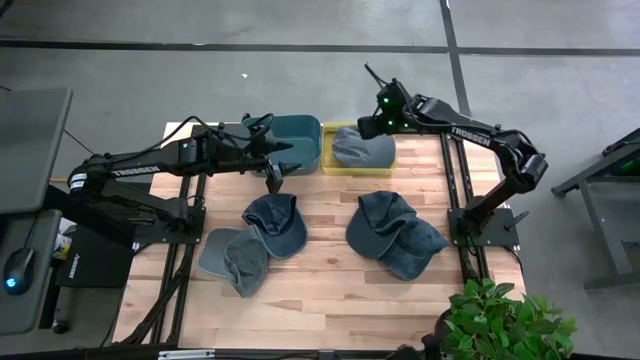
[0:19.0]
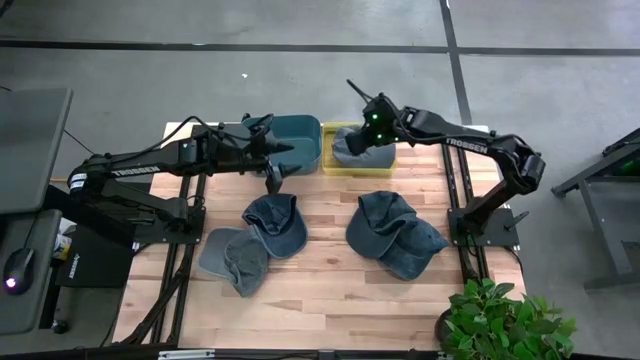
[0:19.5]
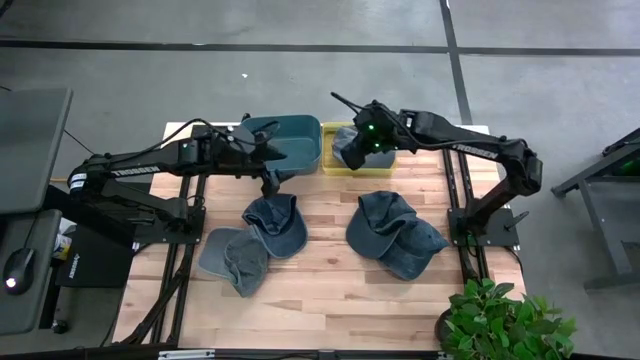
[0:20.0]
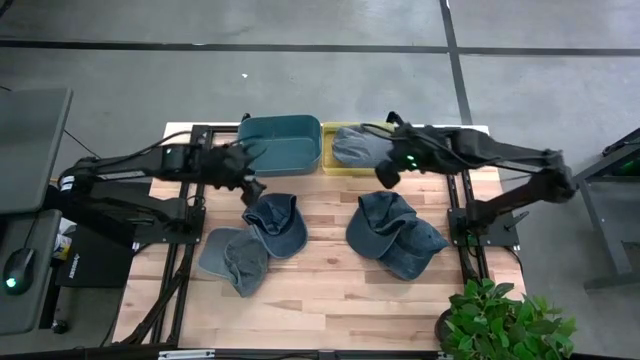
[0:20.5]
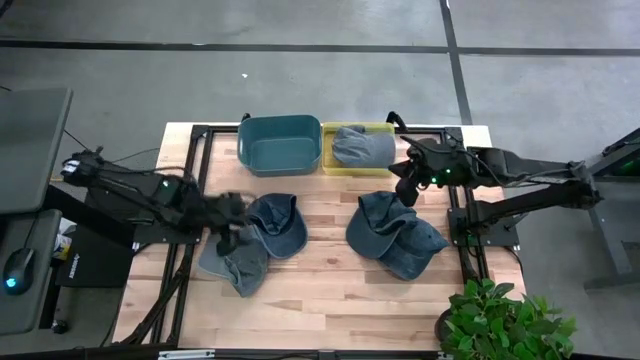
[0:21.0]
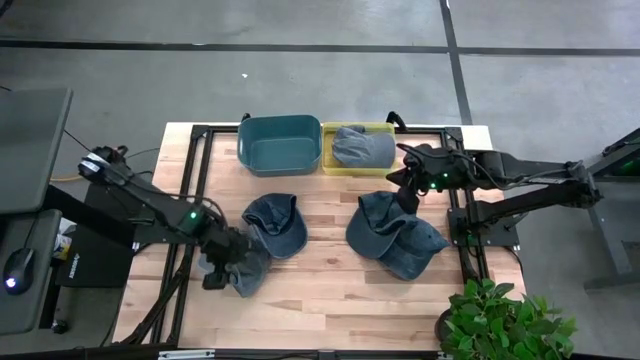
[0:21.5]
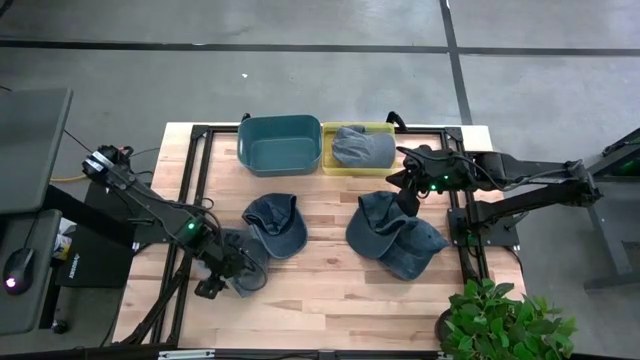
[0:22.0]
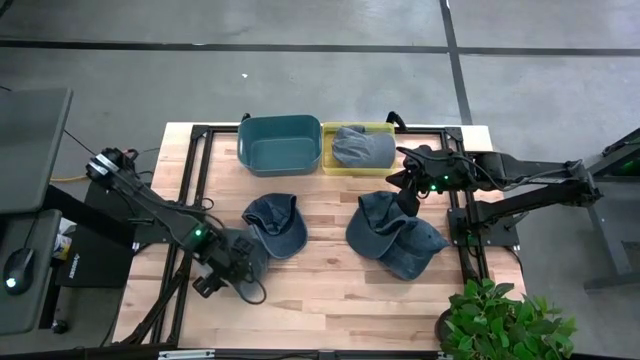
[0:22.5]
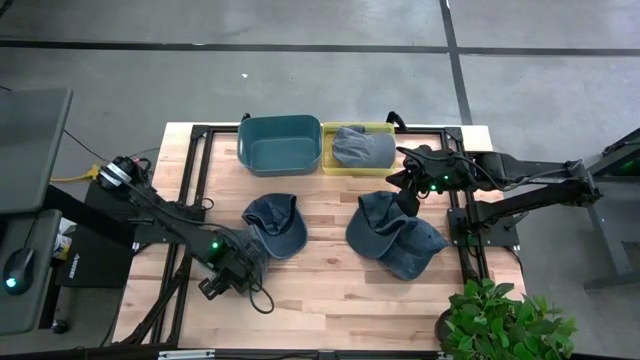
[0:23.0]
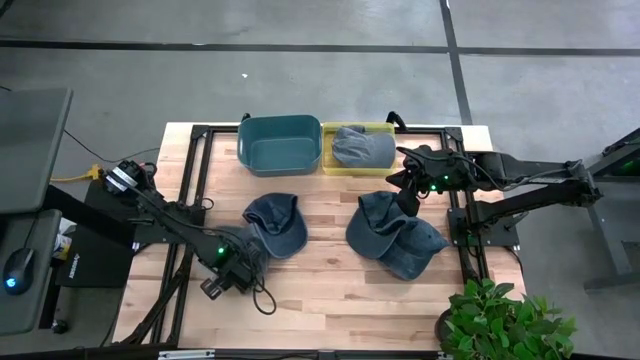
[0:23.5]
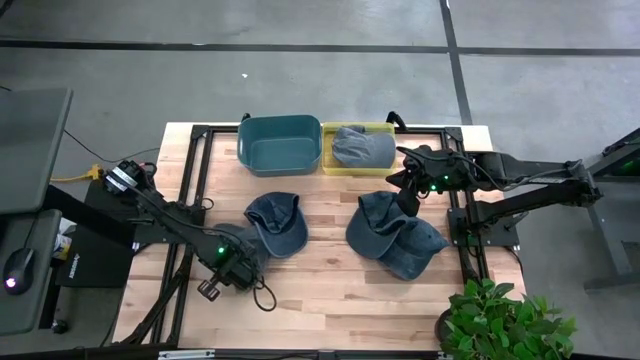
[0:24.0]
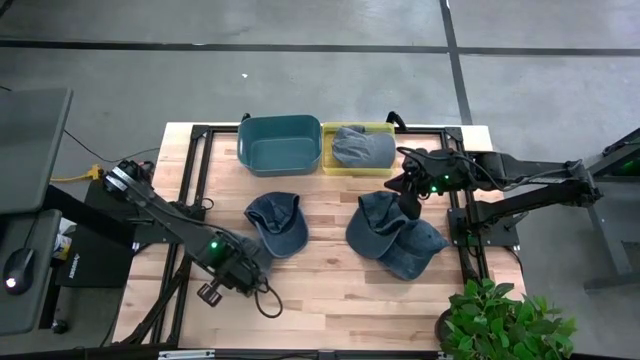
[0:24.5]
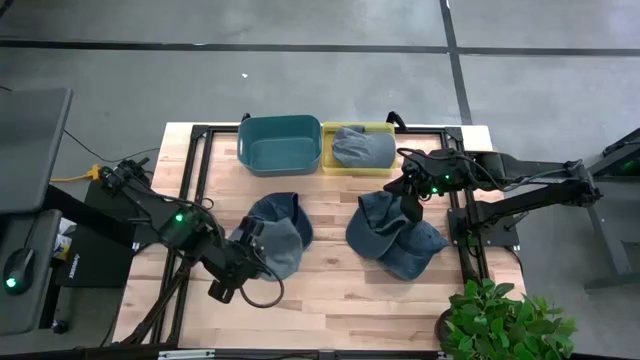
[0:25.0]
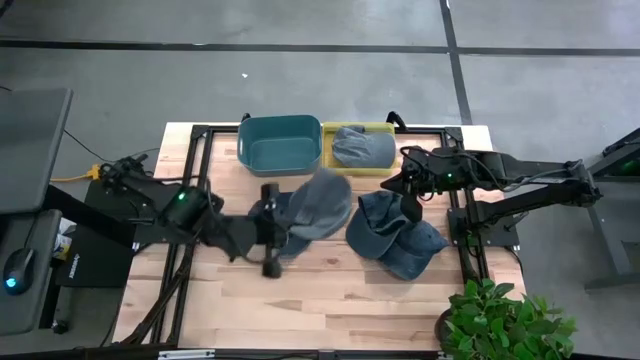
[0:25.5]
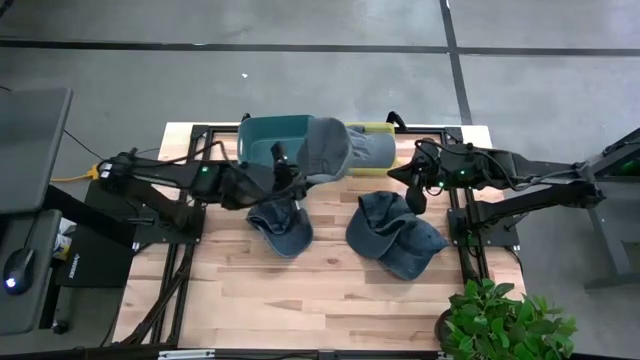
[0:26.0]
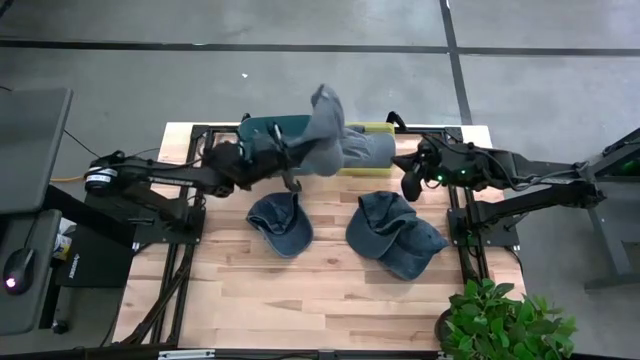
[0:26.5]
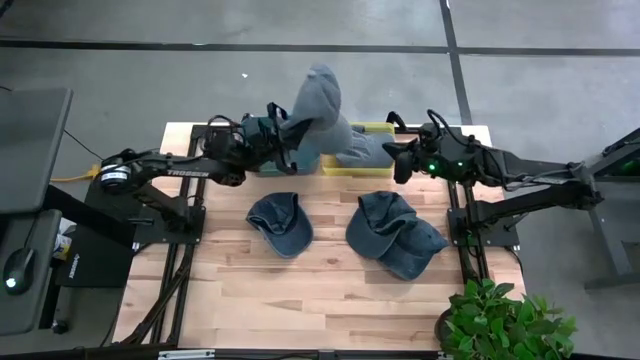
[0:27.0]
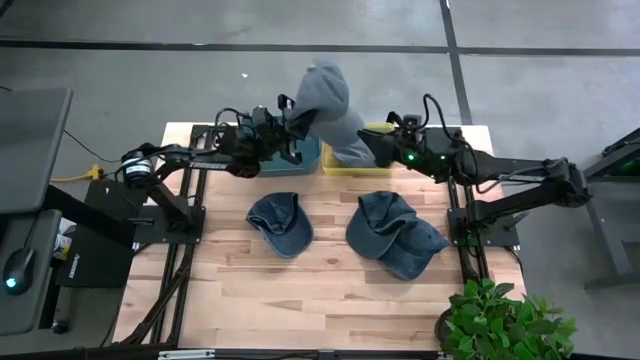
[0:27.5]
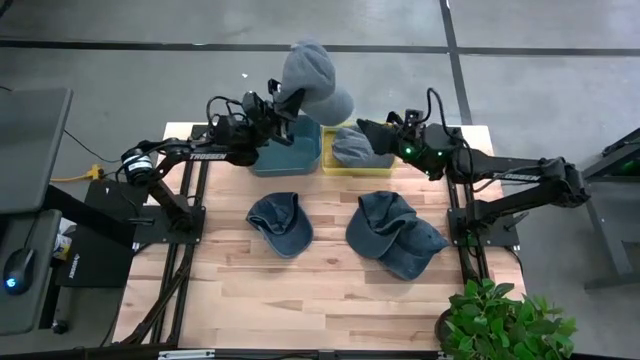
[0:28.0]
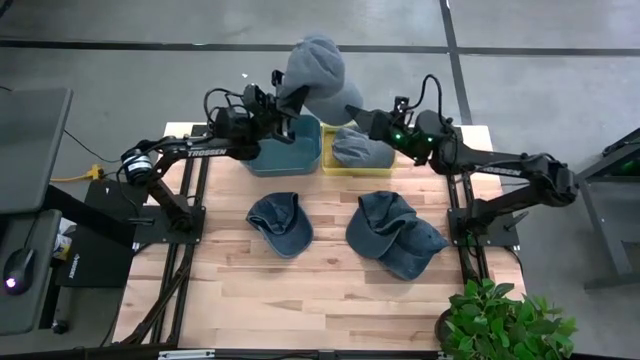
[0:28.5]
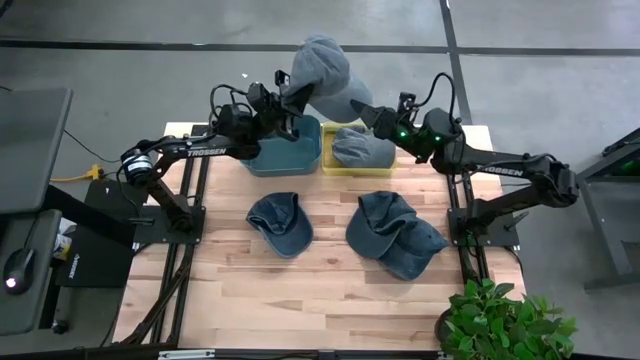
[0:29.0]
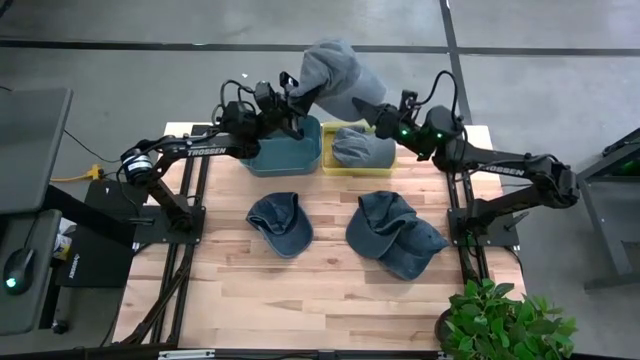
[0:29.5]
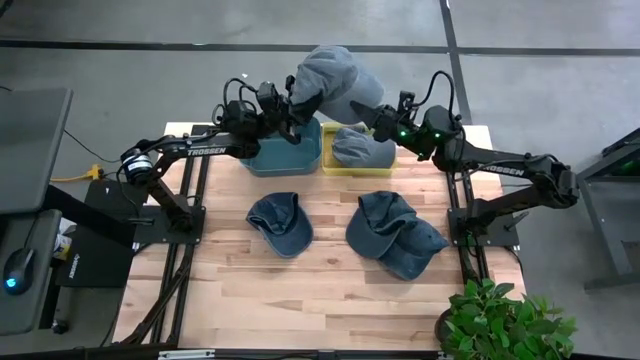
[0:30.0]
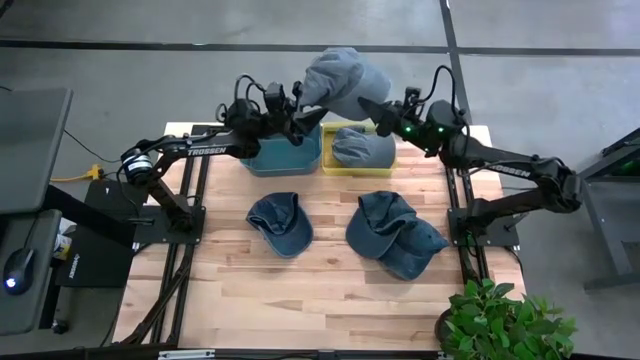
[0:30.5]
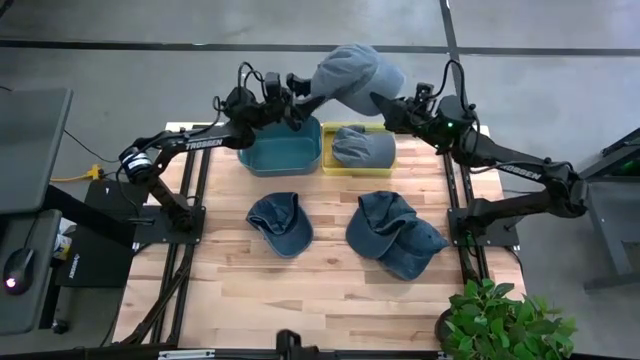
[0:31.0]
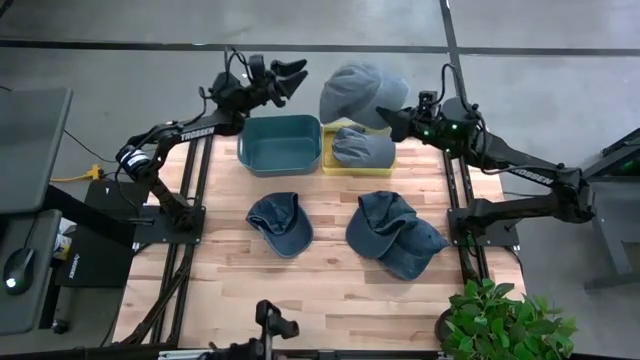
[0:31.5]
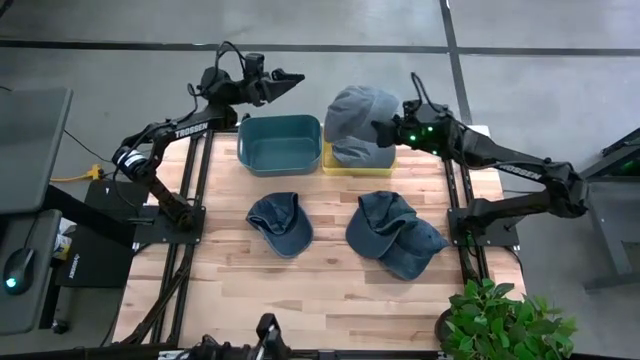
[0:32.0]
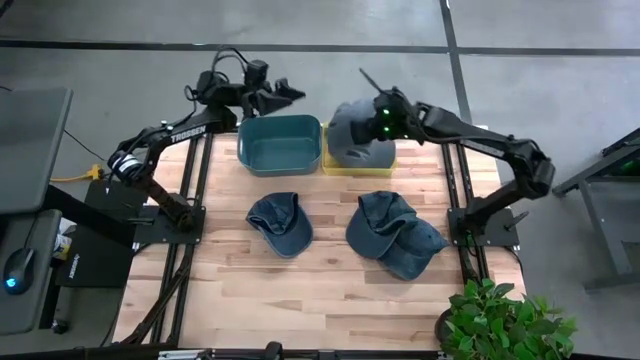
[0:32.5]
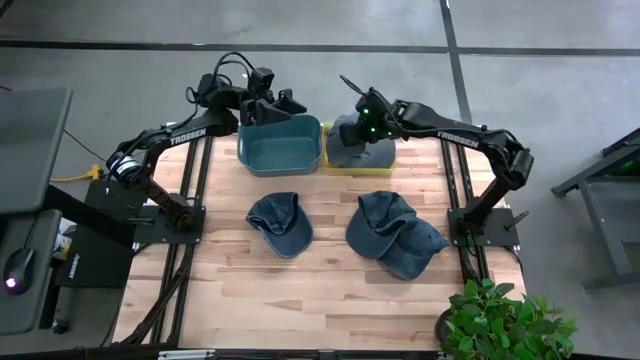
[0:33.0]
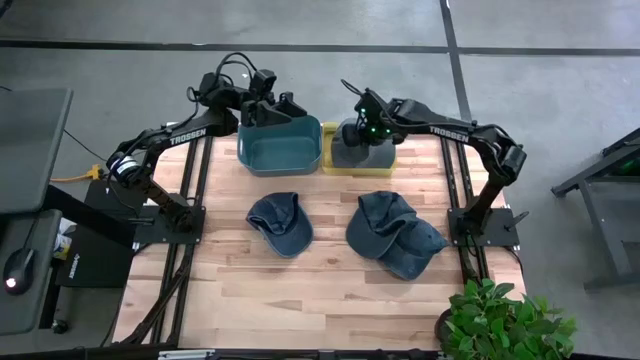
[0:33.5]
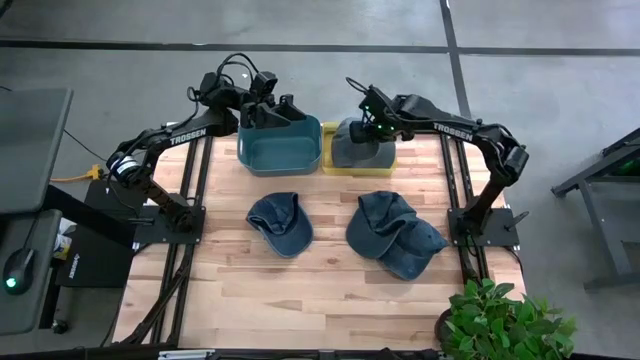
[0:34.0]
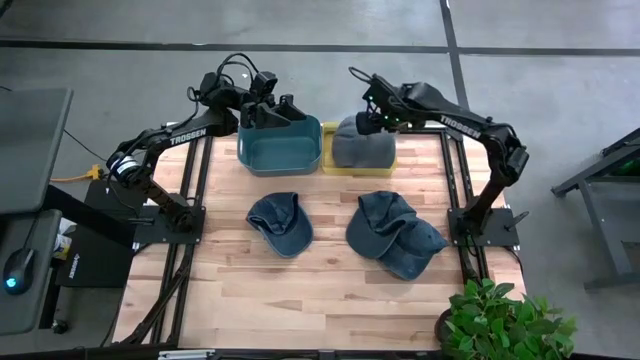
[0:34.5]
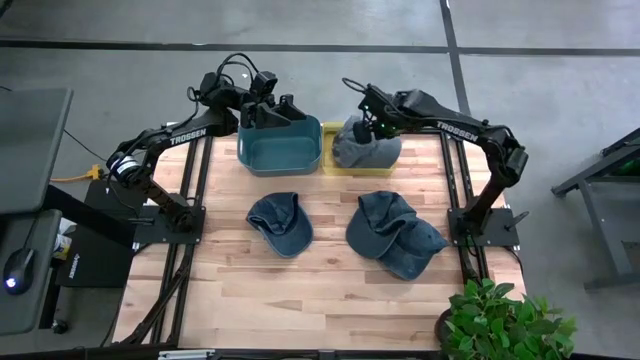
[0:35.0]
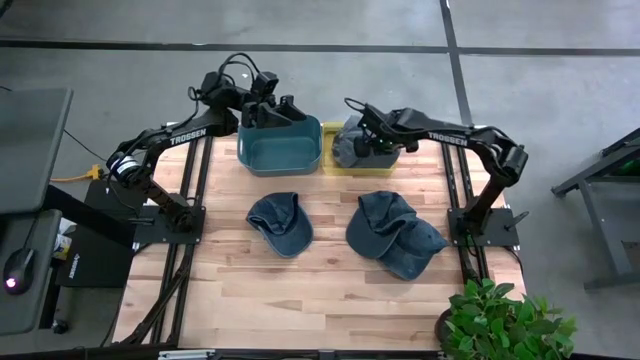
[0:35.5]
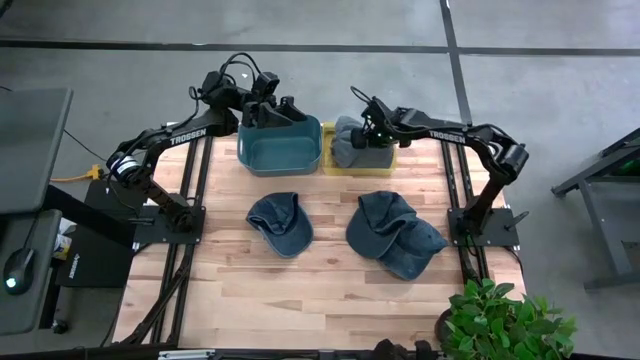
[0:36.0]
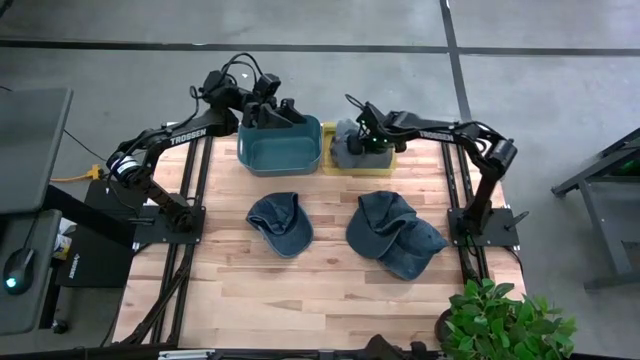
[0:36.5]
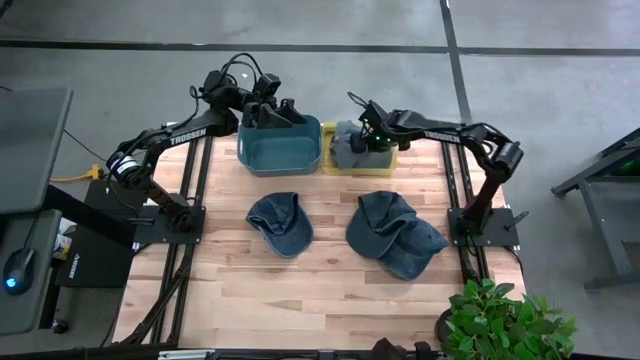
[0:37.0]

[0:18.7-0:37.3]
Task: Pick & Place hat
Put the gray cap into the yellow bin

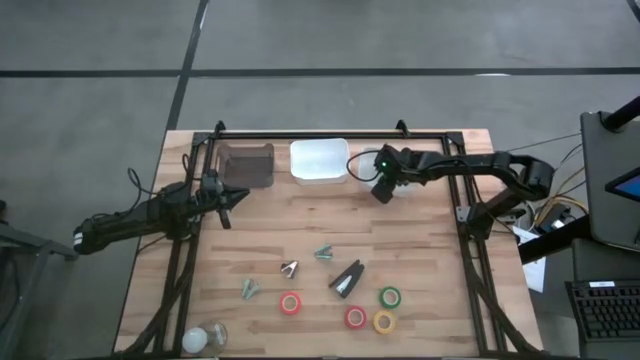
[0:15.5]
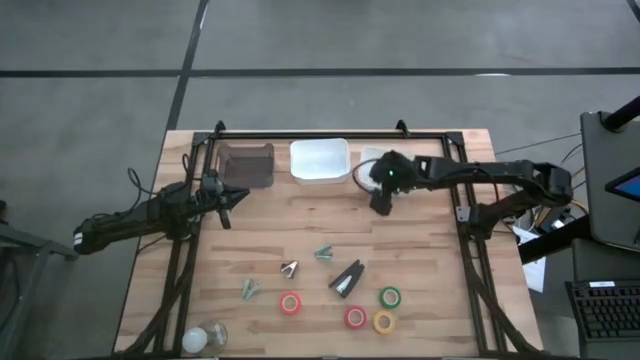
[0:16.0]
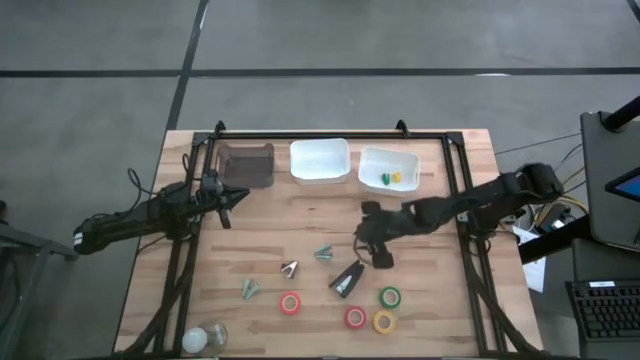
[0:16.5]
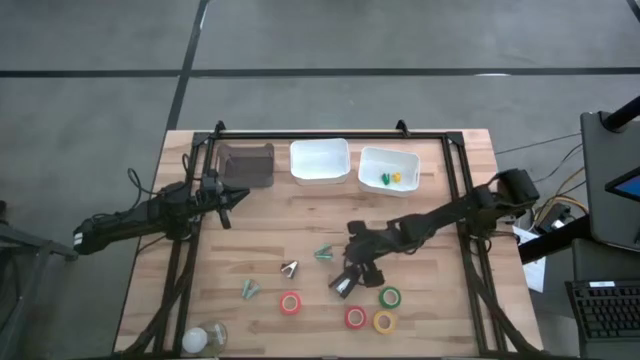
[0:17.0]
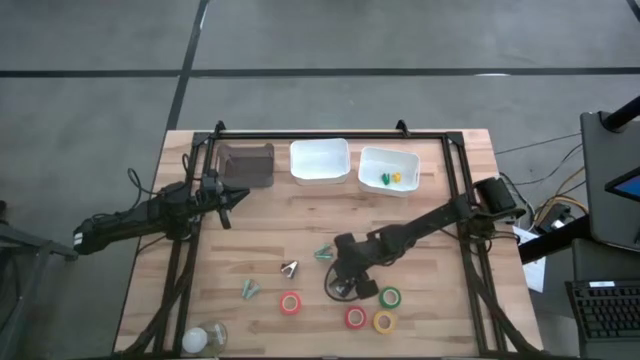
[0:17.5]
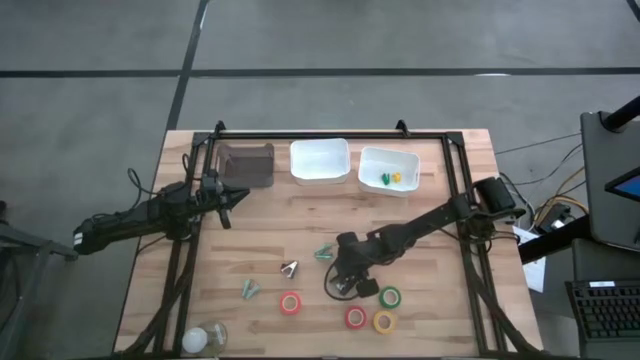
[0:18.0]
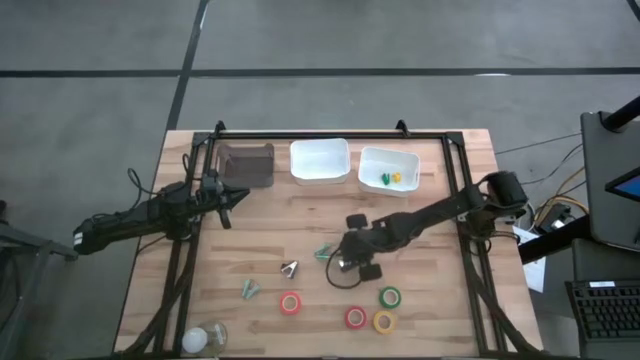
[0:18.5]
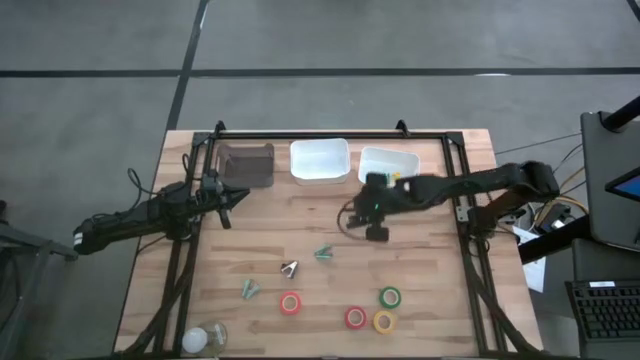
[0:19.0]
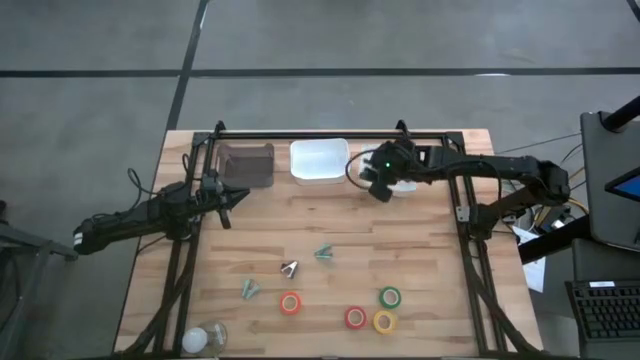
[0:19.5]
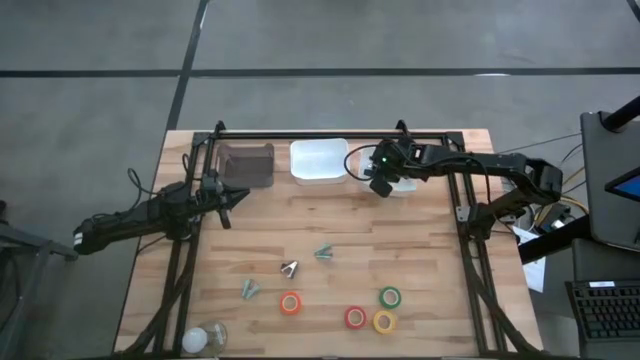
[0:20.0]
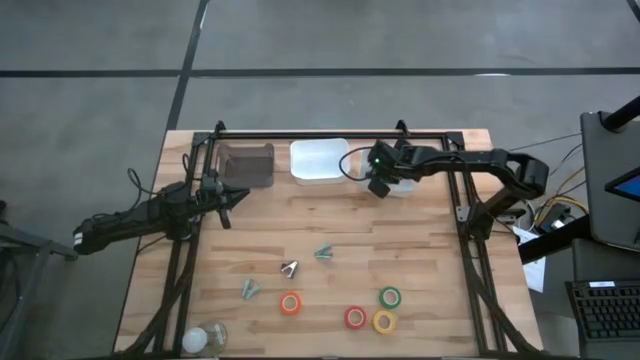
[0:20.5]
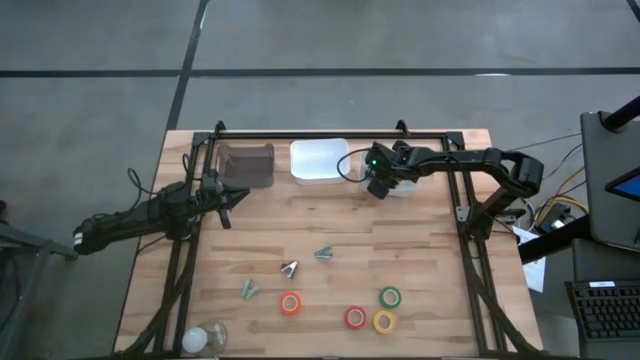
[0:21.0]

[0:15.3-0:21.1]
Task: Pick and place Stapler, Stapler remover, tape
Put the black stapler into the right white bin
